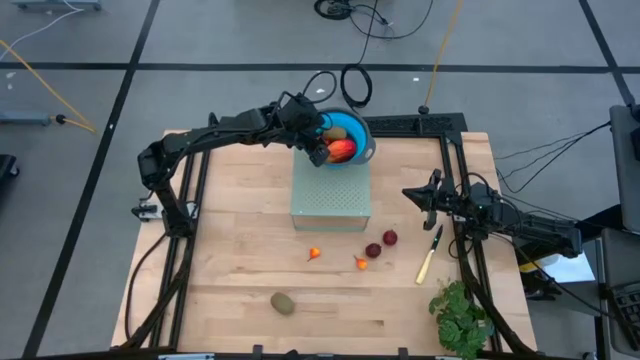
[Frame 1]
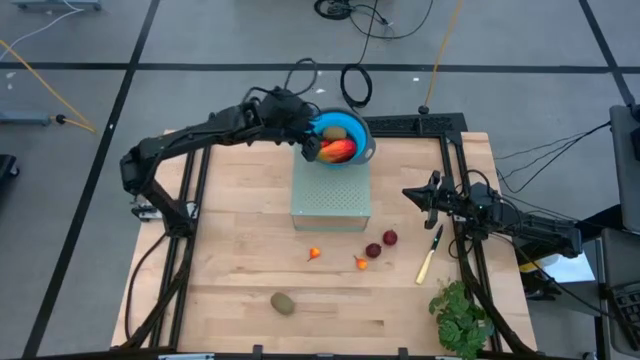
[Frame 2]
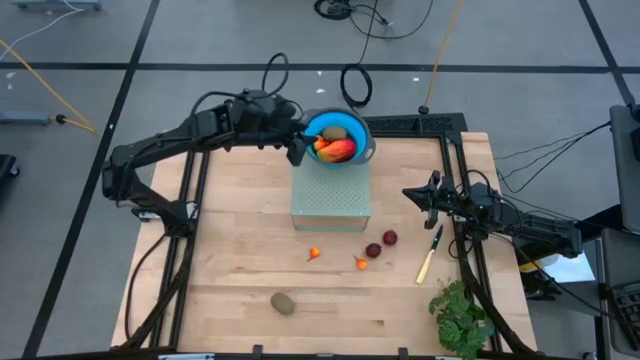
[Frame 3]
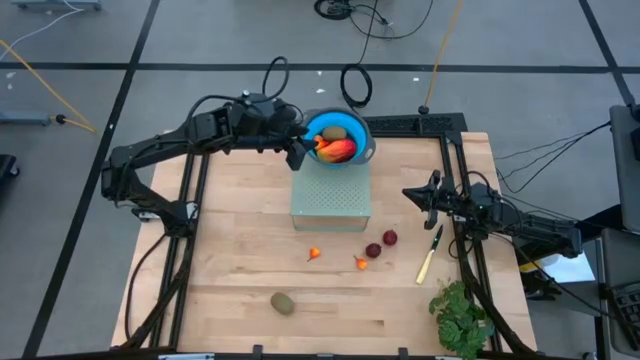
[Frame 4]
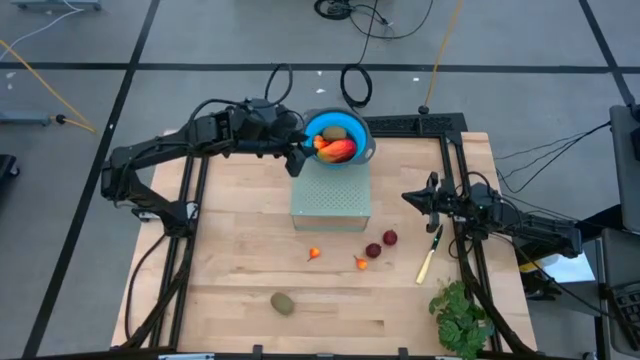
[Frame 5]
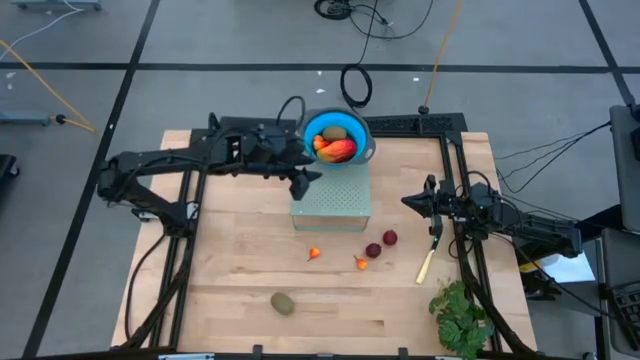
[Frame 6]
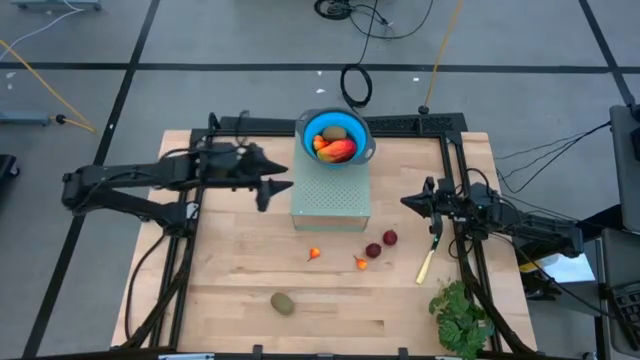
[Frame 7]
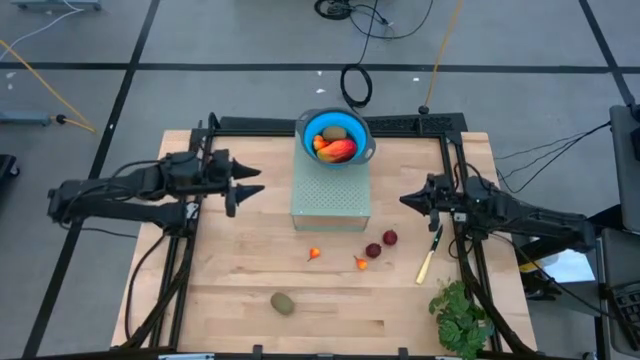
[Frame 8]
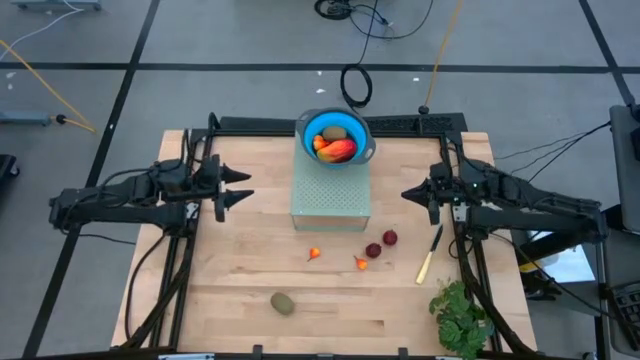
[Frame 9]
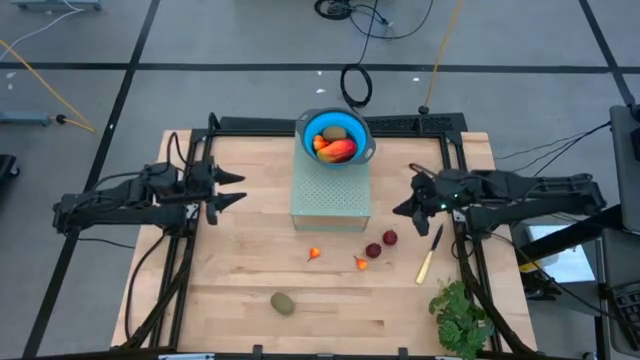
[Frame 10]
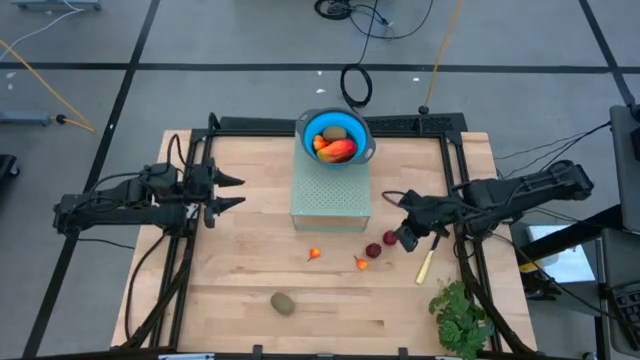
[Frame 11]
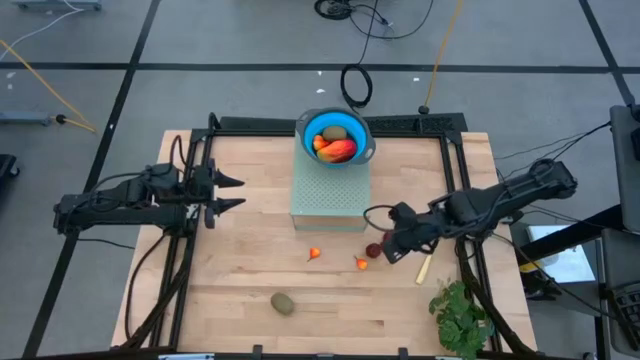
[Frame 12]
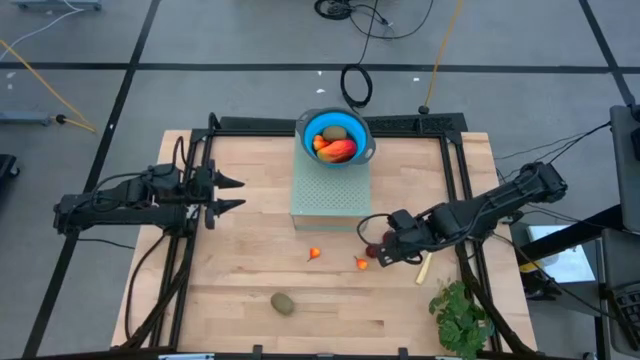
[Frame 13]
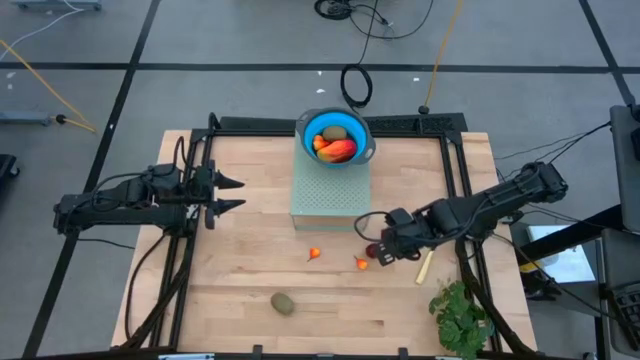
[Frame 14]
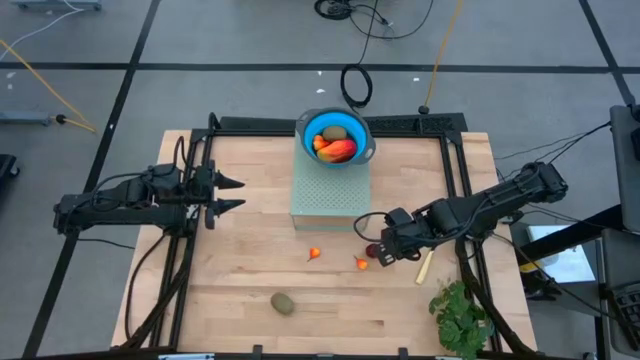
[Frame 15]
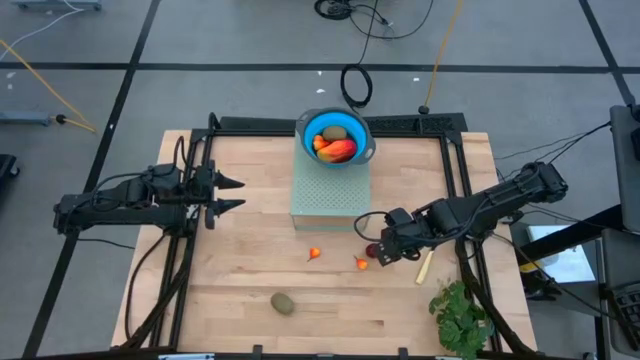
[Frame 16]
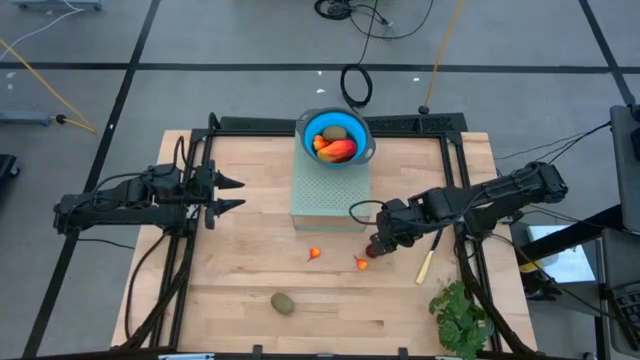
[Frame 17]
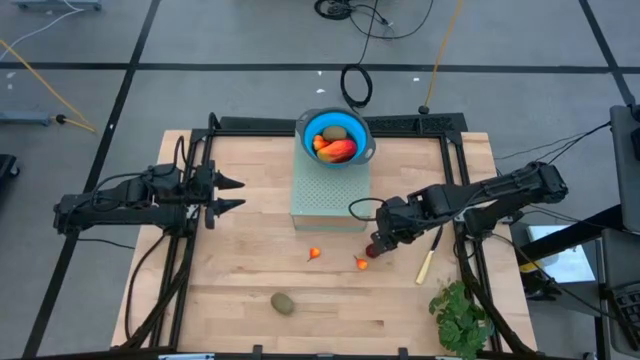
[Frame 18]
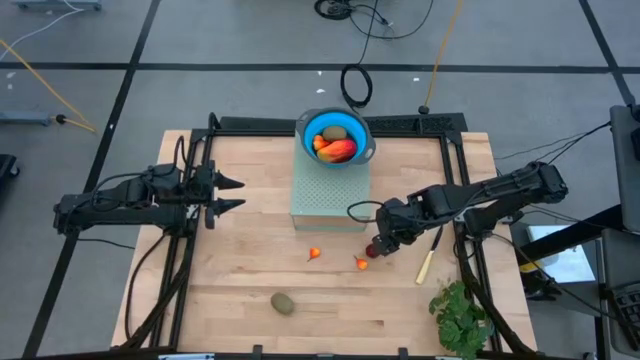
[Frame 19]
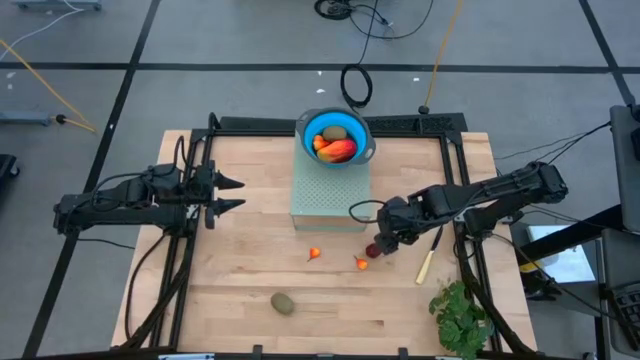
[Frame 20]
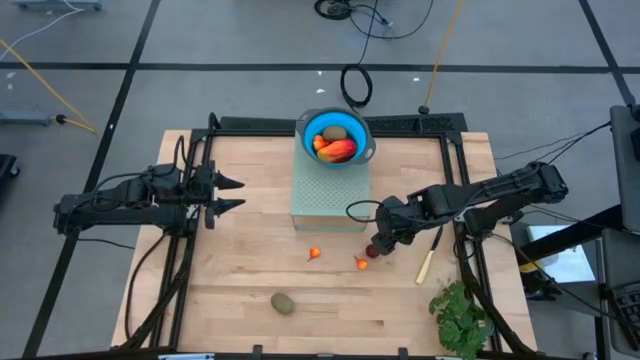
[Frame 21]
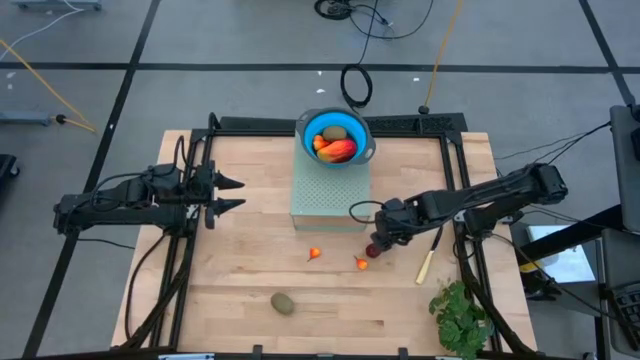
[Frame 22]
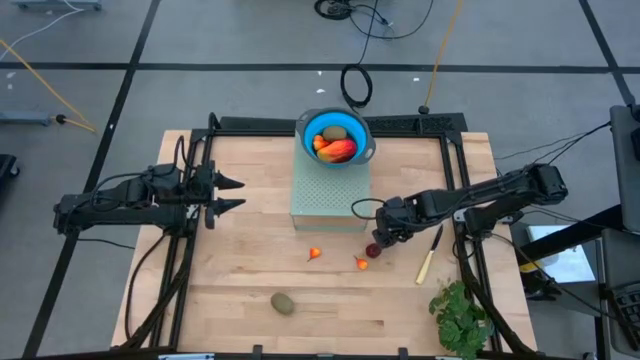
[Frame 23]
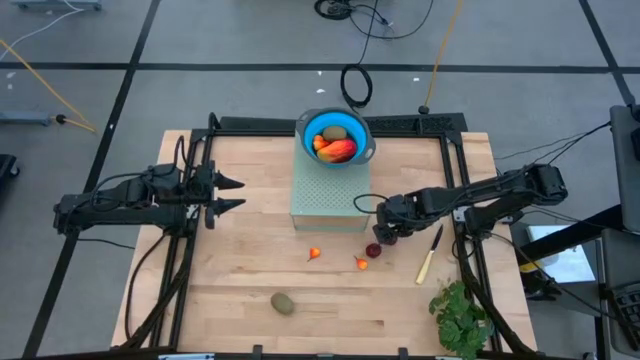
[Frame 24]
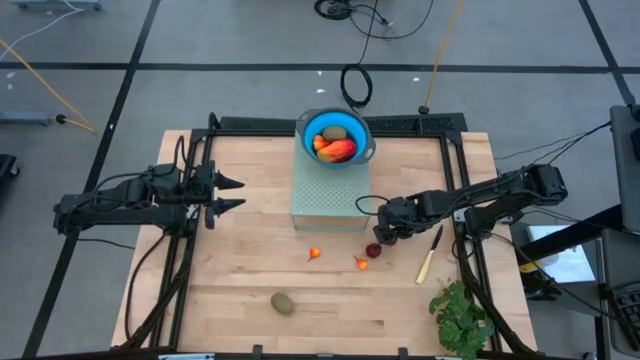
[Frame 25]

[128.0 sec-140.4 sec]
Task: Pick & Place Fruit
Put the pomegranate into the blue strainer bowl on the shelf

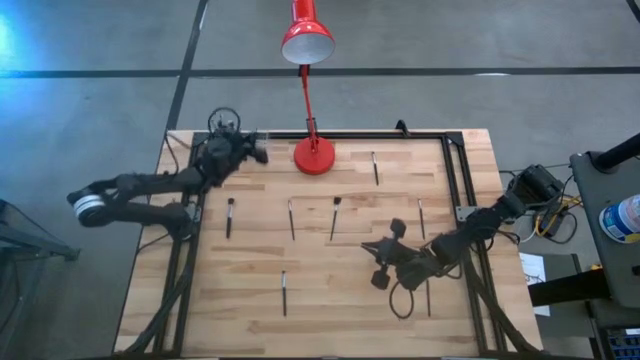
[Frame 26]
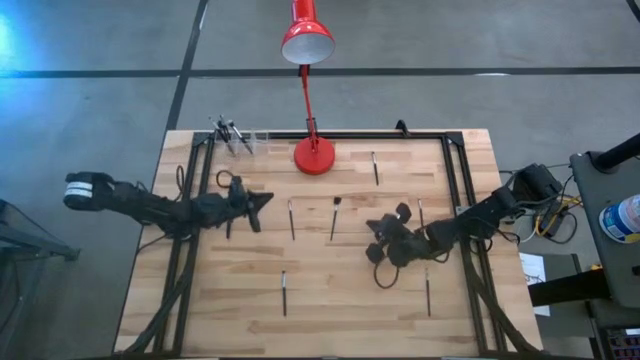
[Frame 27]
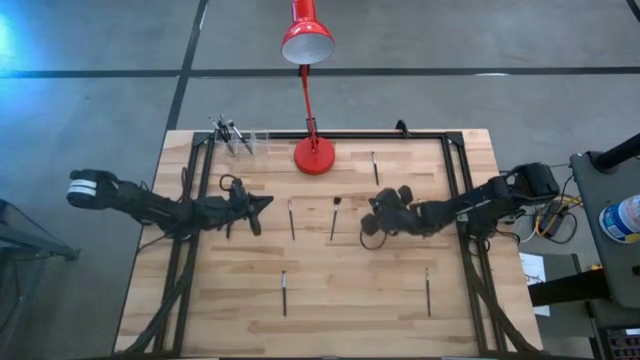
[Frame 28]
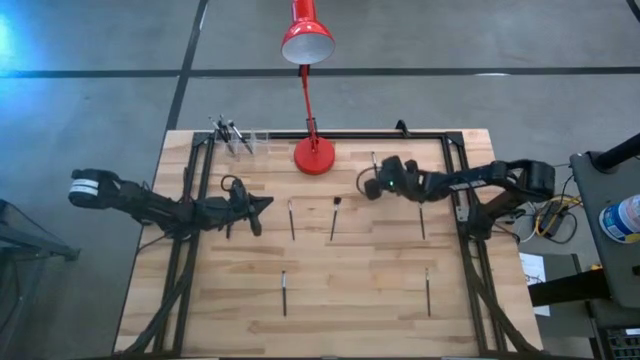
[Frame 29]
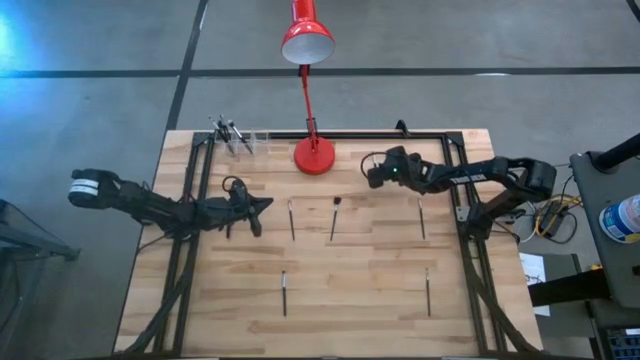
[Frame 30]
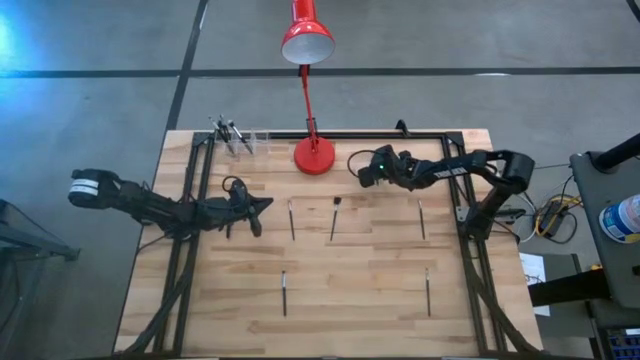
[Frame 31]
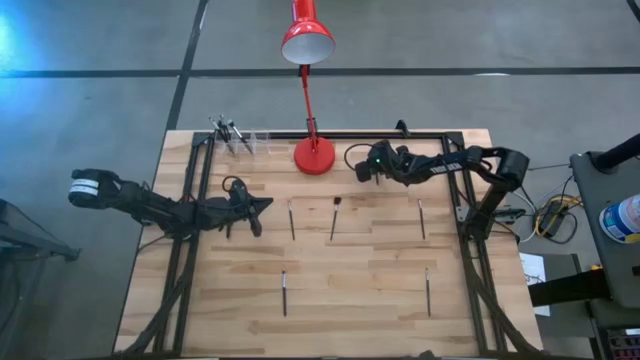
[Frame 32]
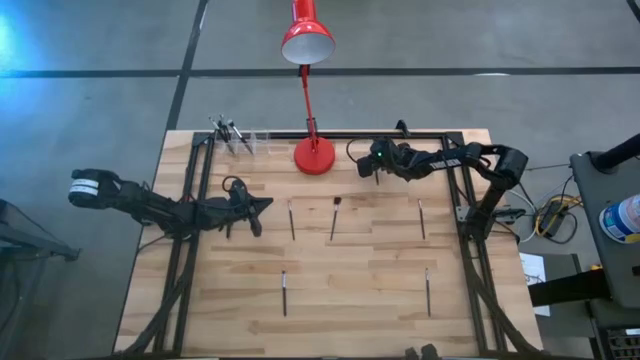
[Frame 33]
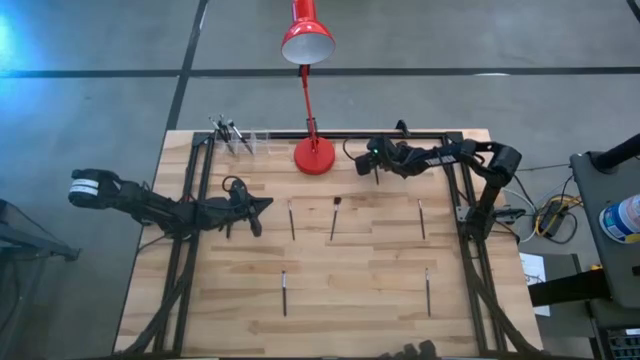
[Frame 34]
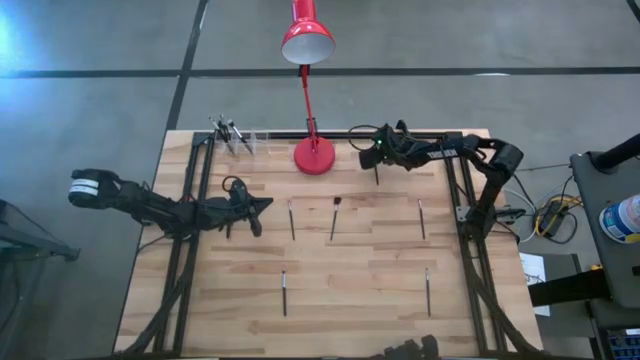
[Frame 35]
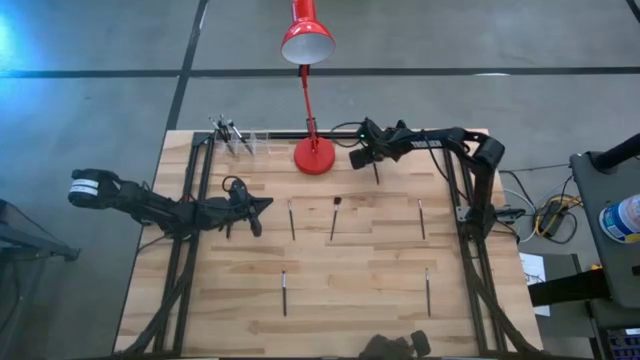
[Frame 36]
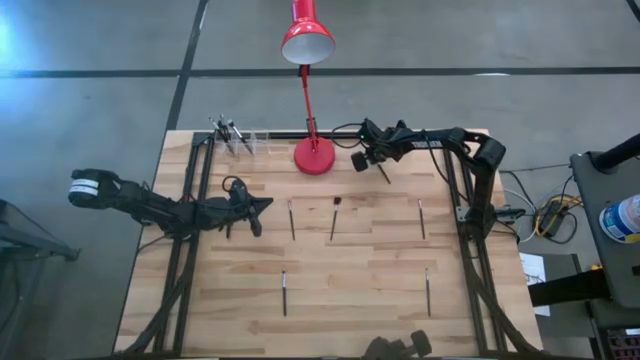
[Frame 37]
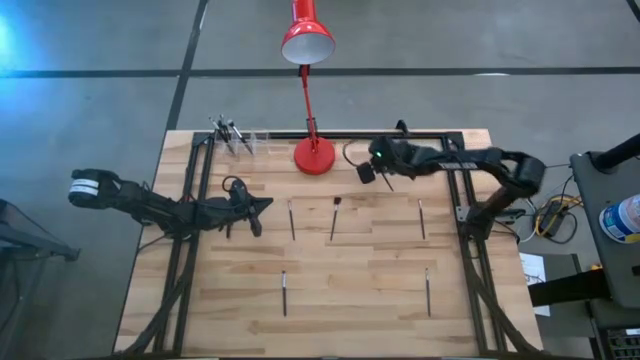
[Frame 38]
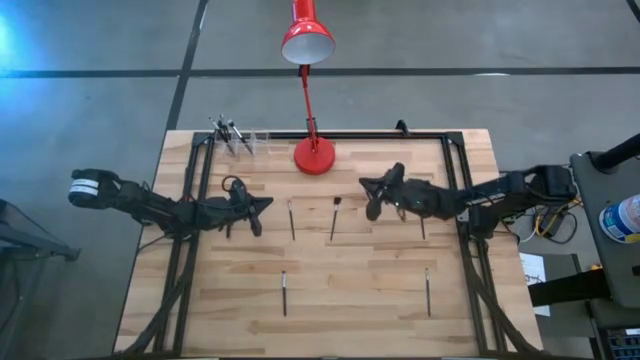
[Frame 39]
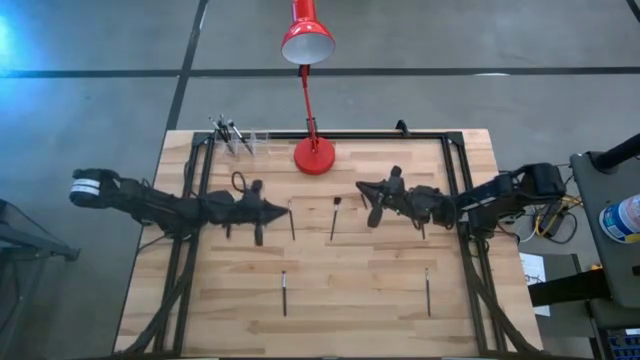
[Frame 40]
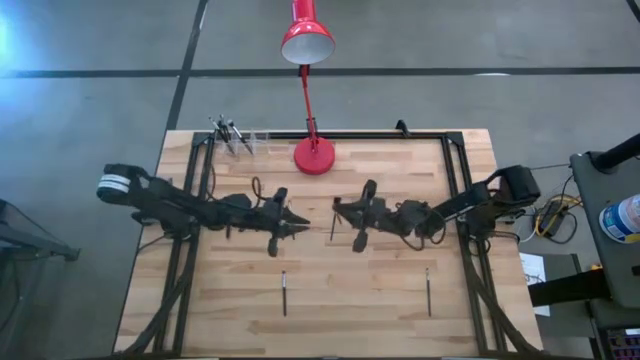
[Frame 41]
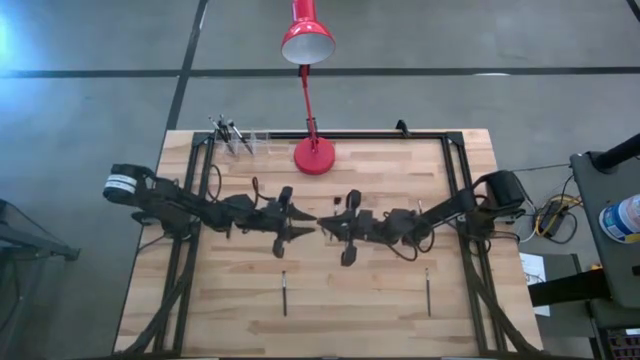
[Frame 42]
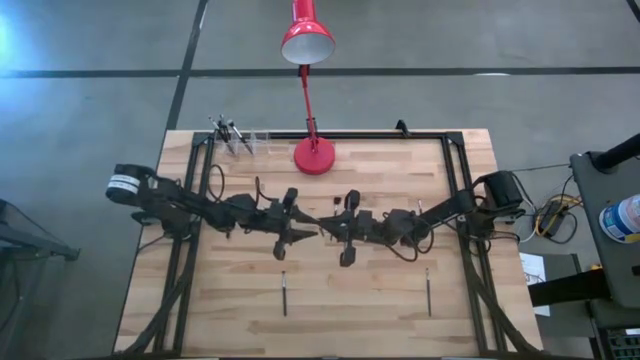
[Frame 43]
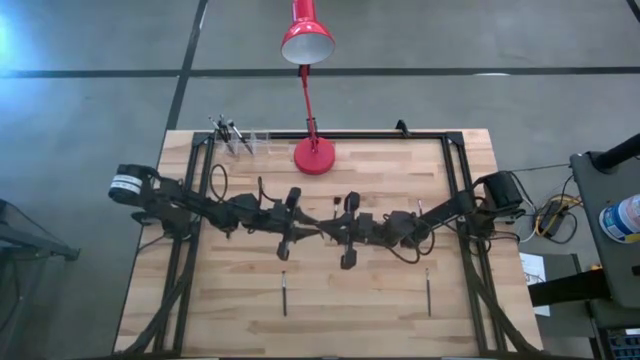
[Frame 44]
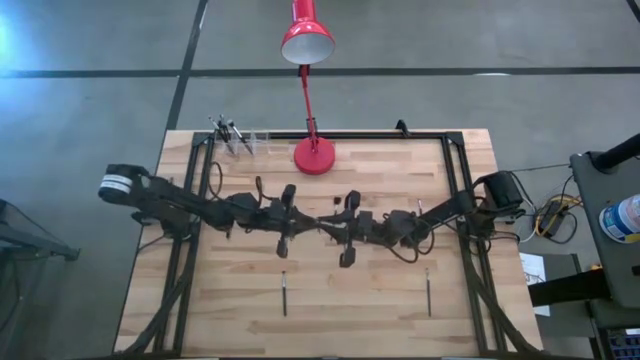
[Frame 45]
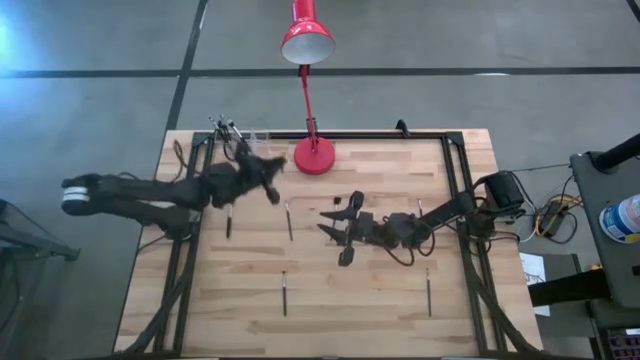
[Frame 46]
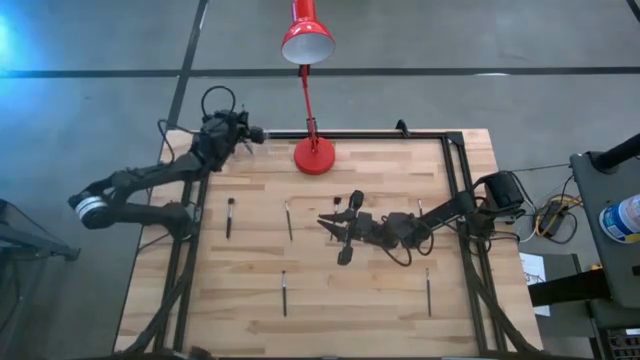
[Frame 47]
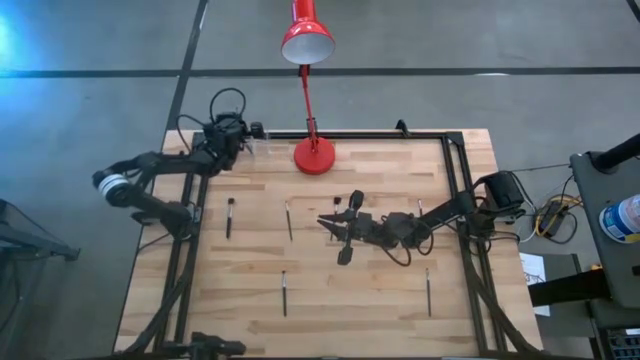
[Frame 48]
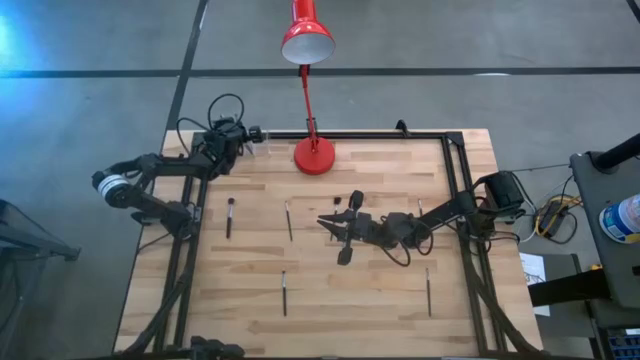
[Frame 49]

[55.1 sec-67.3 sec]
Task: Pick & Place Makeup Supplies
Put the makeup brush into the transparent organizer
